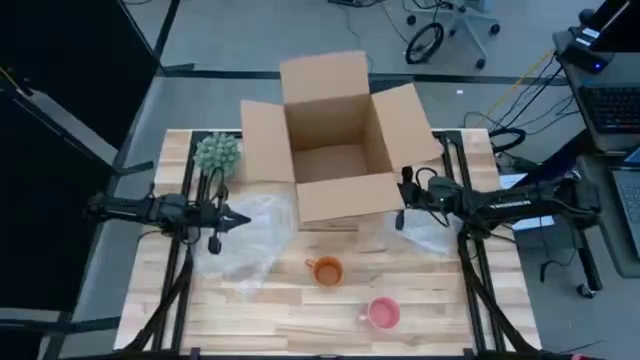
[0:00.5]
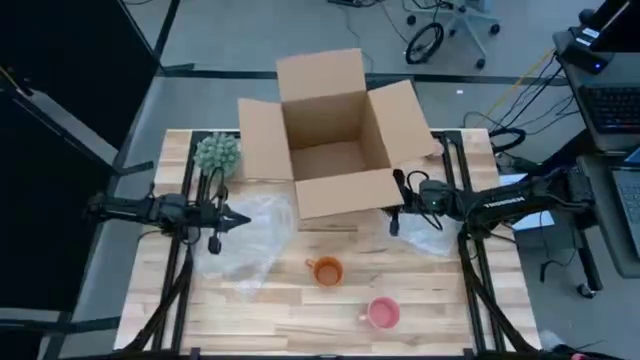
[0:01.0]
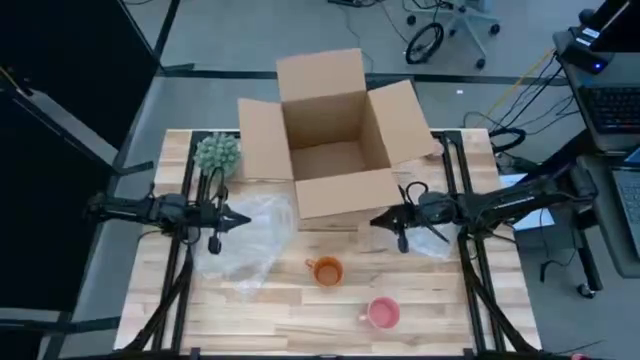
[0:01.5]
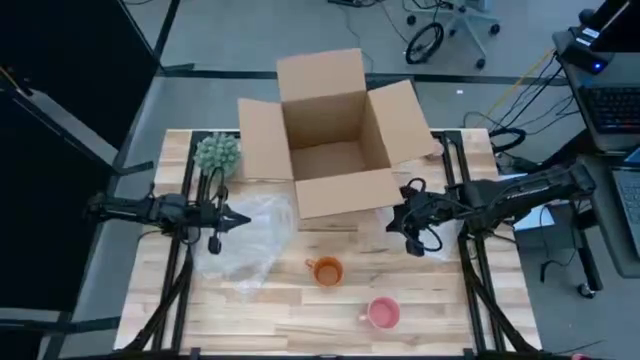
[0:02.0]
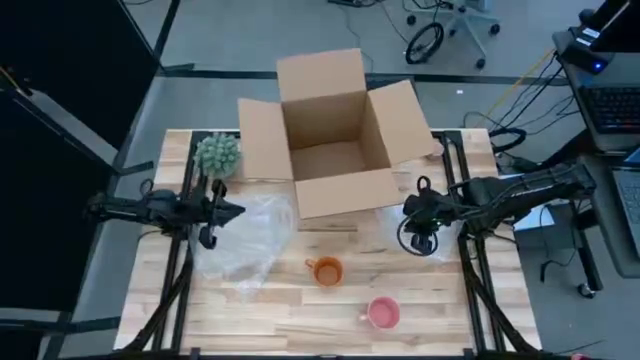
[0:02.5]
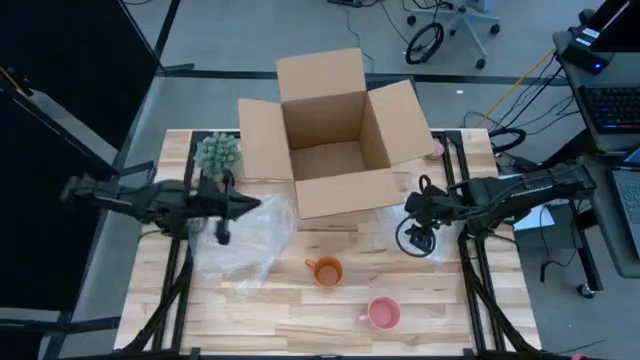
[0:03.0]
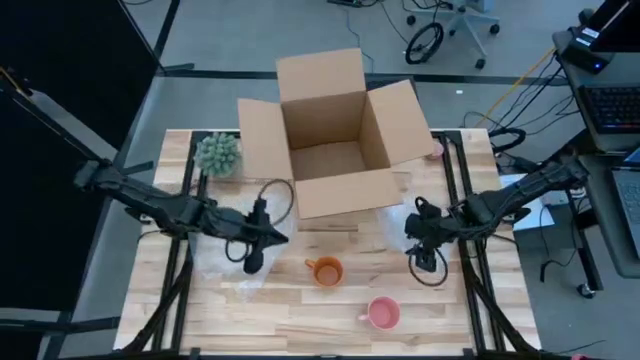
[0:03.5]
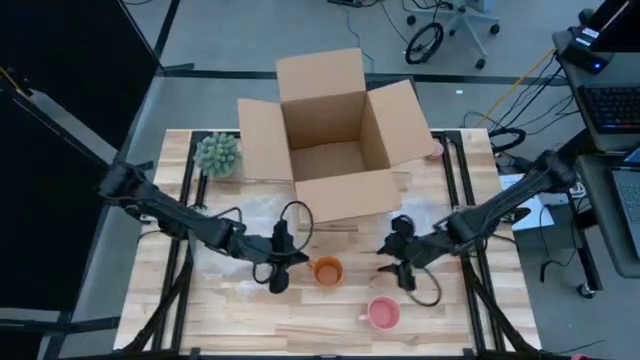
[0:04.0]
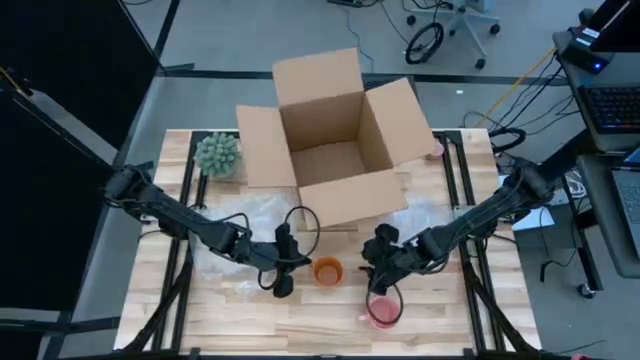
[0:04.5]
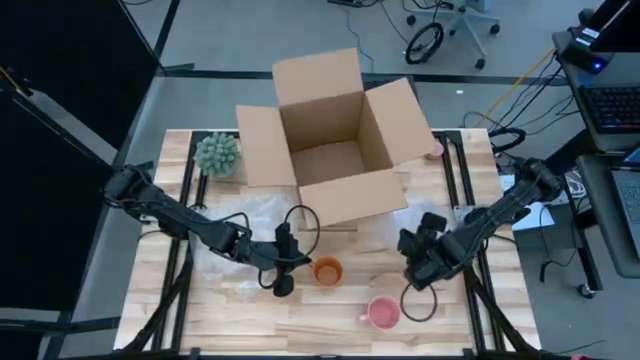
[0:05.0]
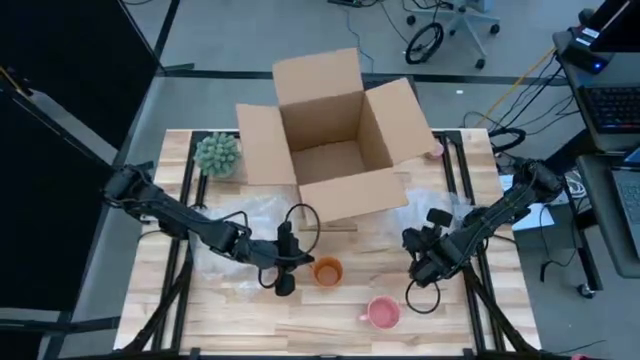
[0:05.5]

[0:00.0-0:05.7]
Task: wrap mug
Prepare the right bubble wrap

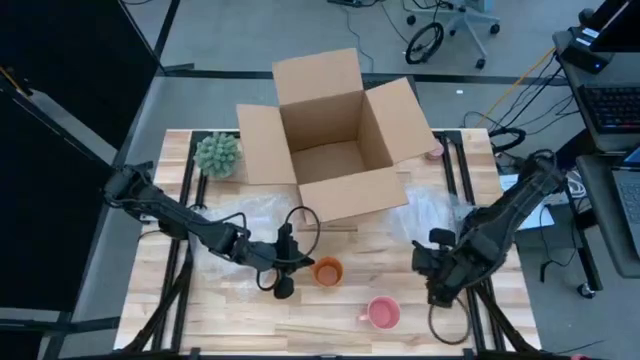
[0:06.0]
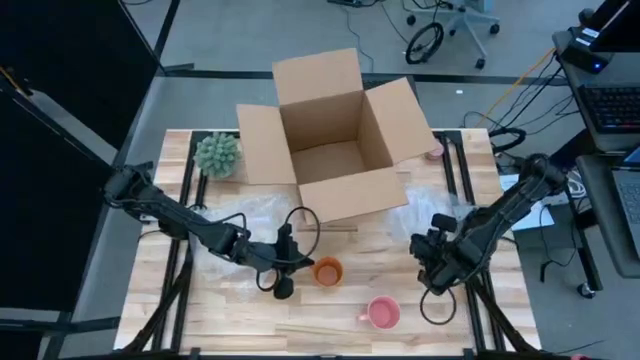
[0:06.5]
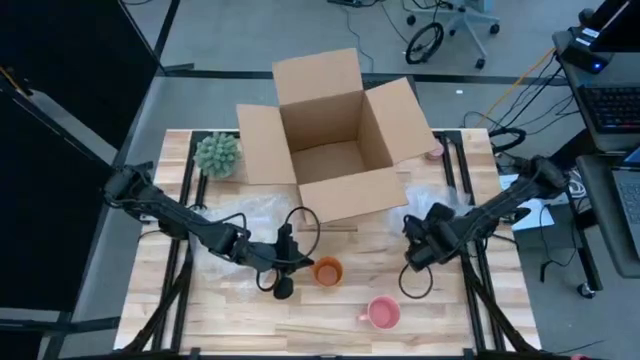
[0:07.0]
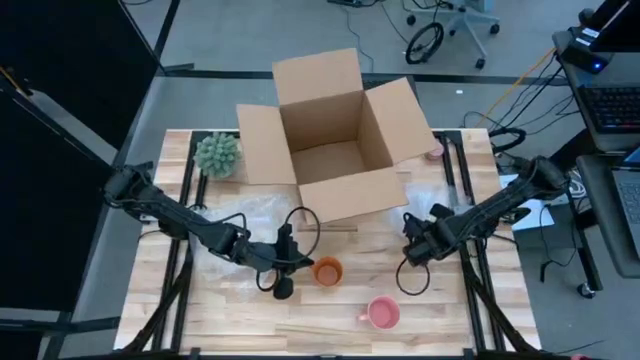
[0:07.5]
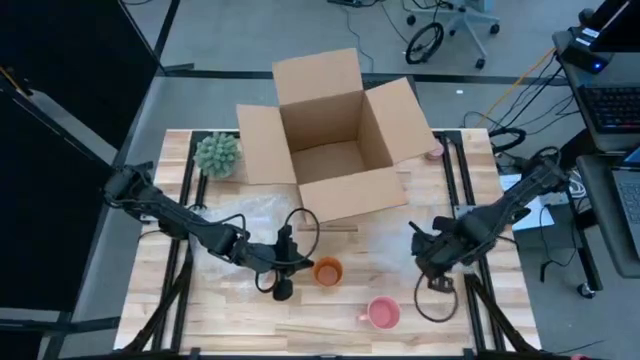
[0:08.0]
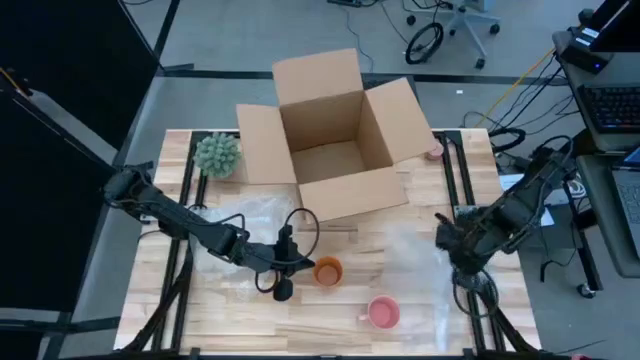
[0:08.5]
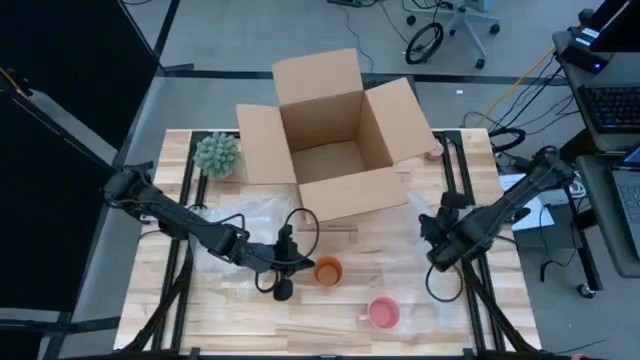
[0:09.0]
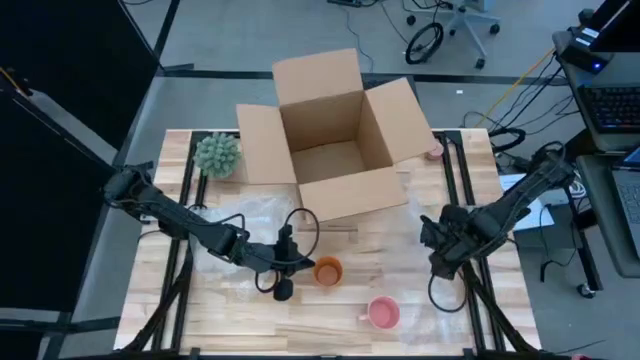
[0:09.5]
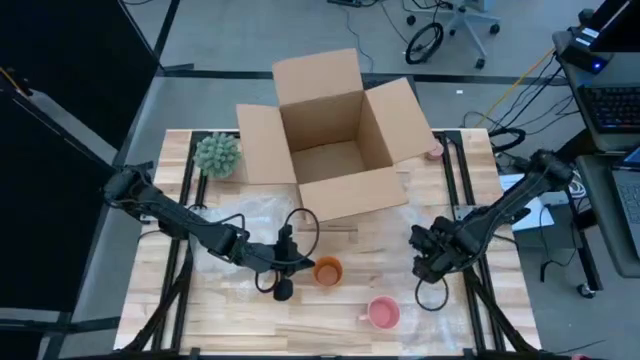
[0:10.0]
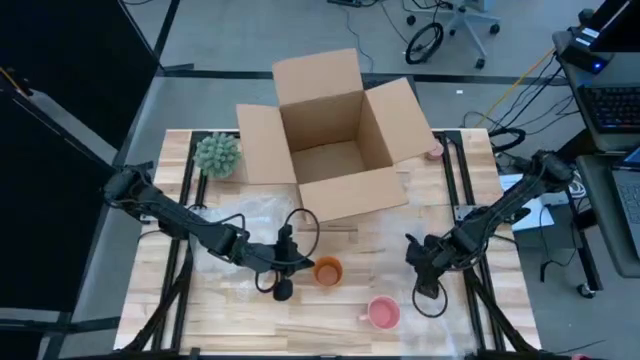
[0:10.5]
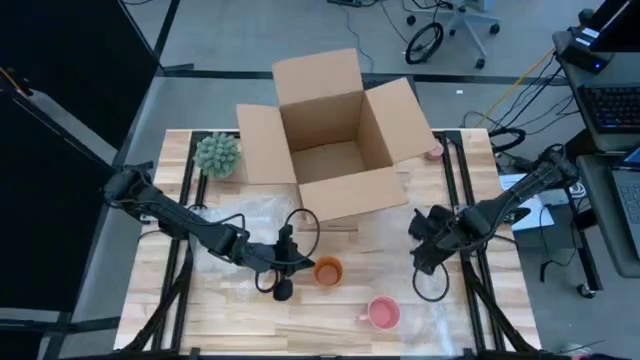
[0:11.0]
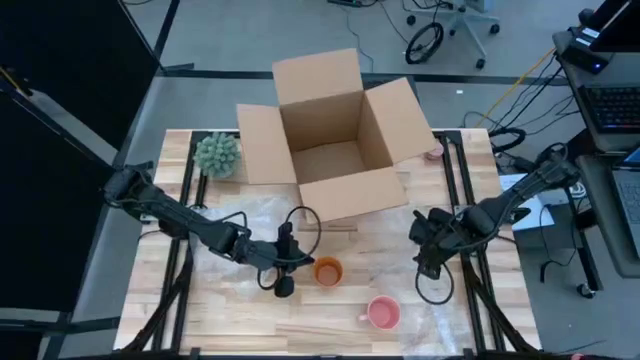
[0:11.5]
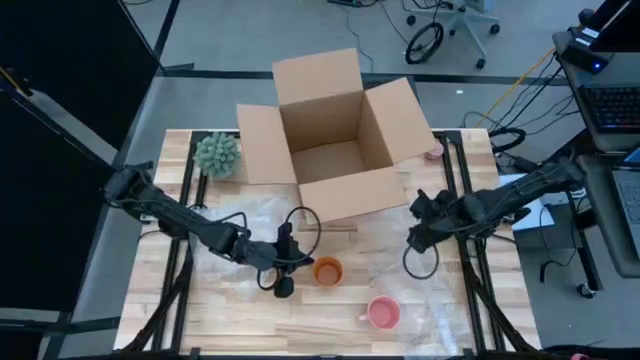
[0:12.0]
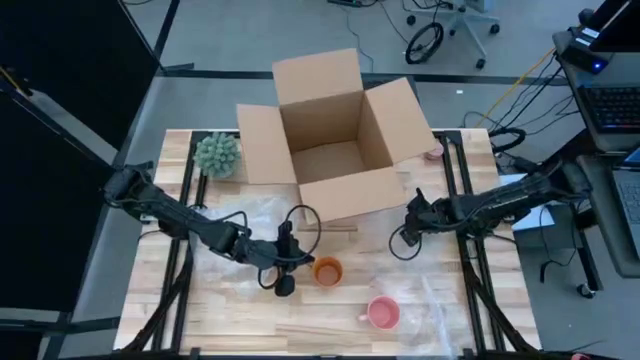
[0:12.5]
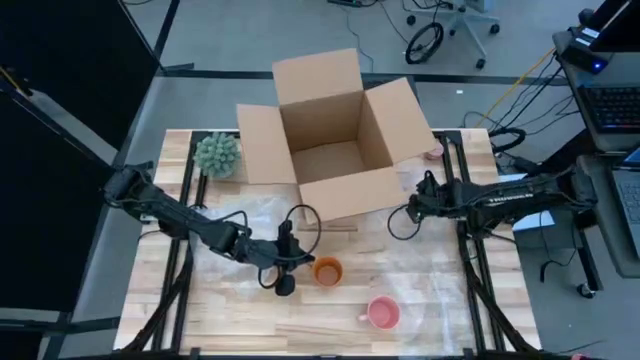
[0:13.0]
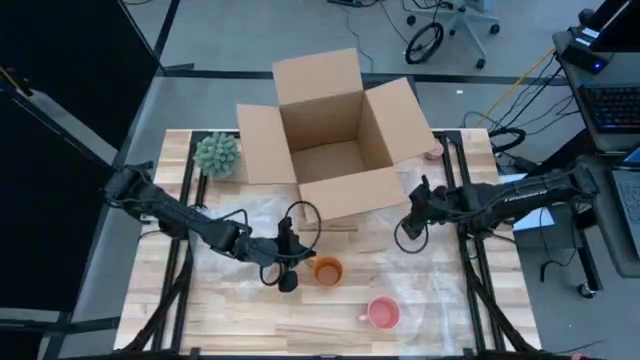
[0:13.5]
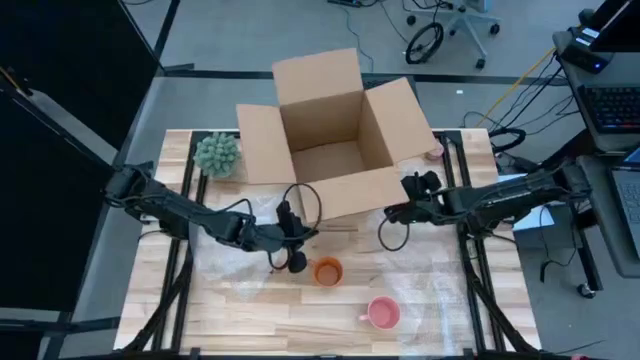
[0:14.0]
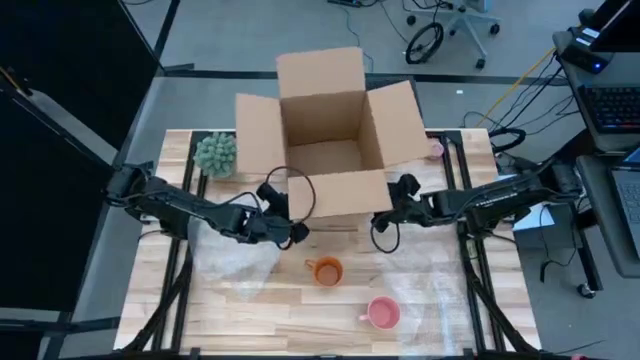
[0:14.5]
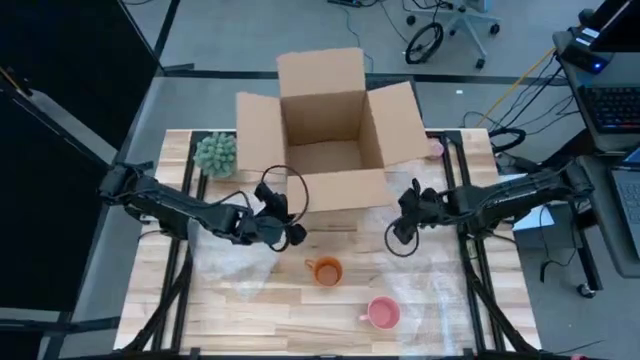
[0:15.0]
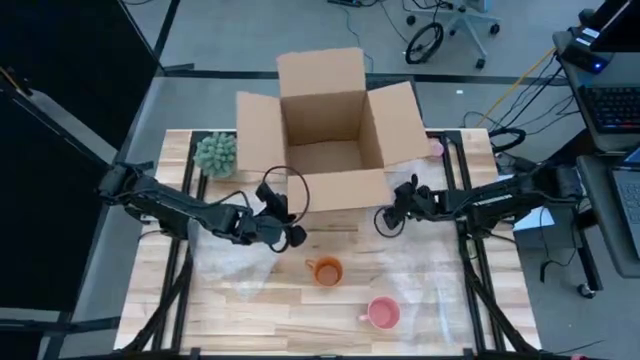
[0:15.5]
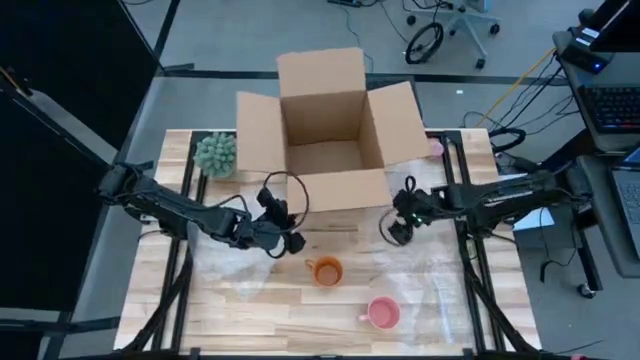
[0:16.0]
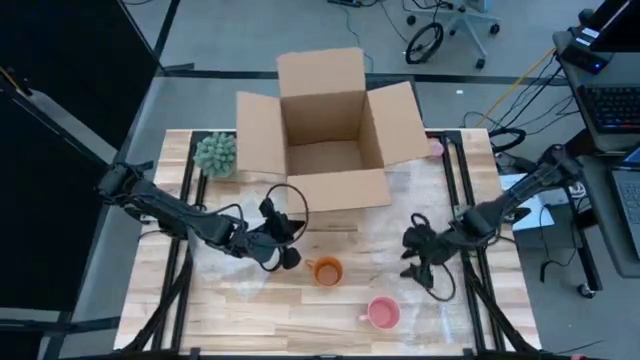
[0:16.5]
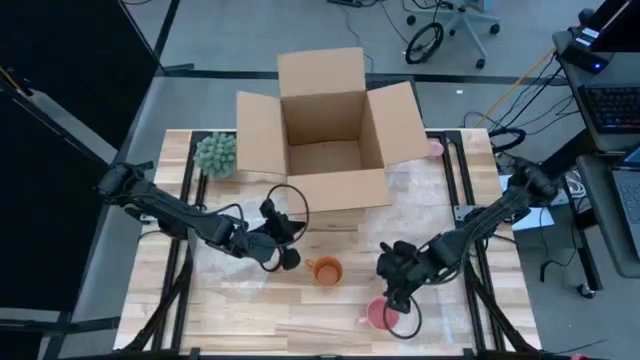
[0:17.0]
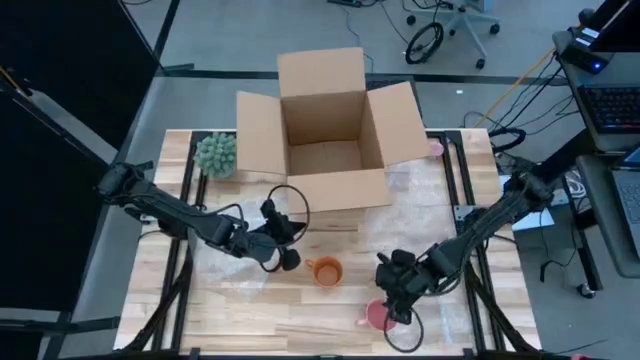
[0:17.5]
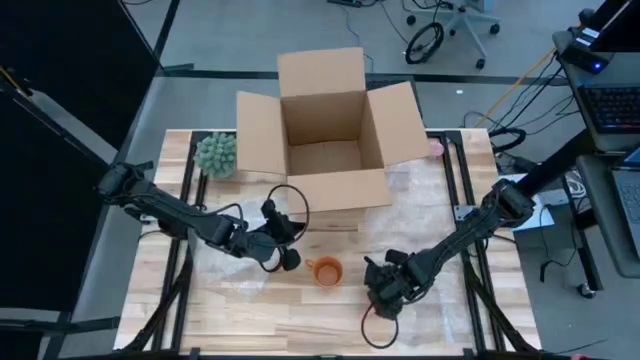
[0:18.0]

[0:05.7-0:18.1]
Prepare the right bubble wrap

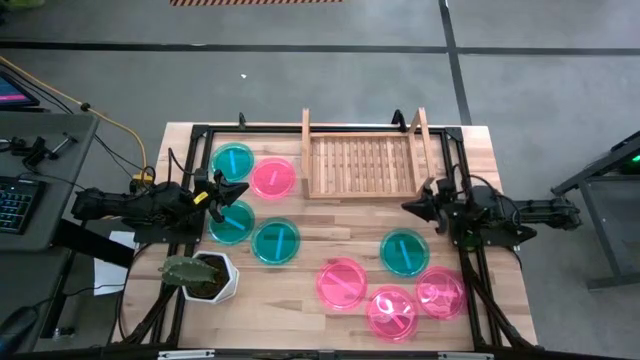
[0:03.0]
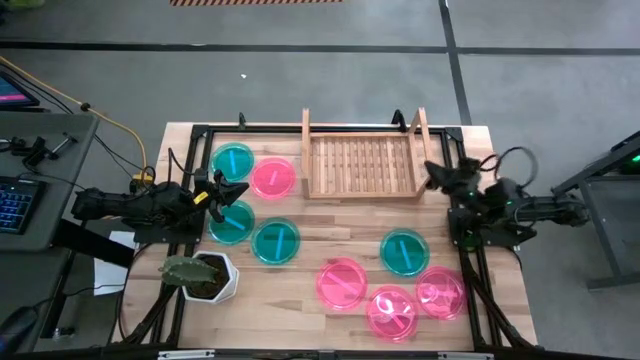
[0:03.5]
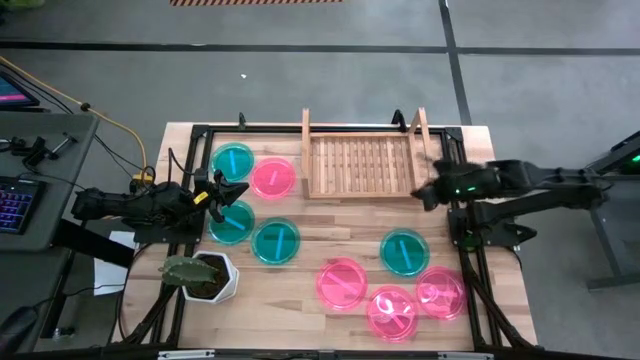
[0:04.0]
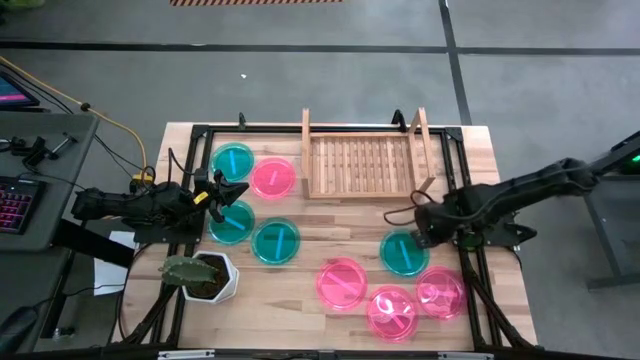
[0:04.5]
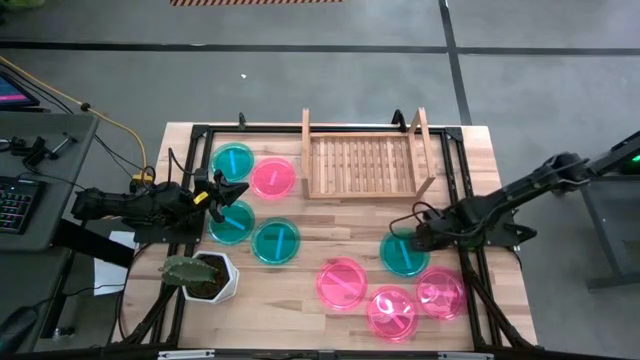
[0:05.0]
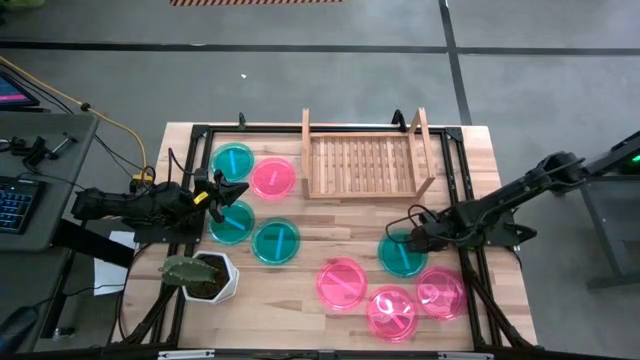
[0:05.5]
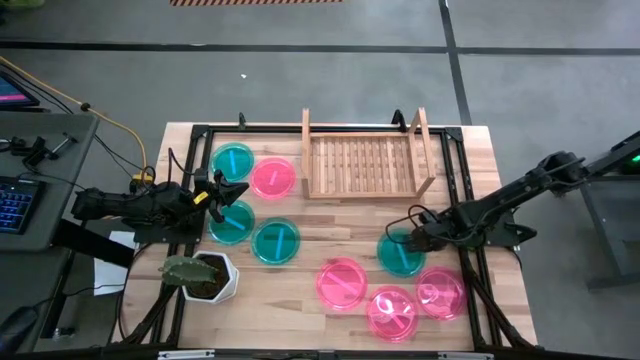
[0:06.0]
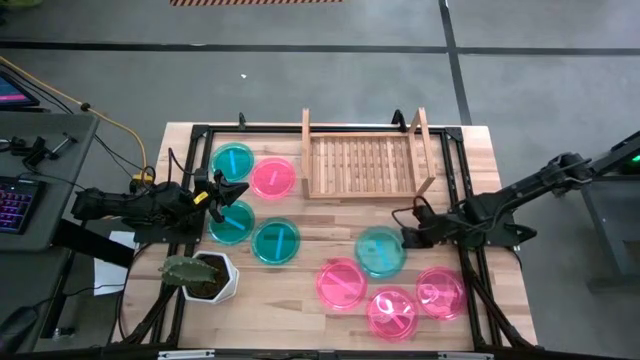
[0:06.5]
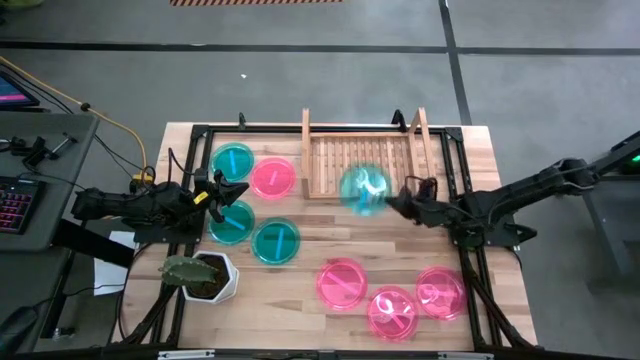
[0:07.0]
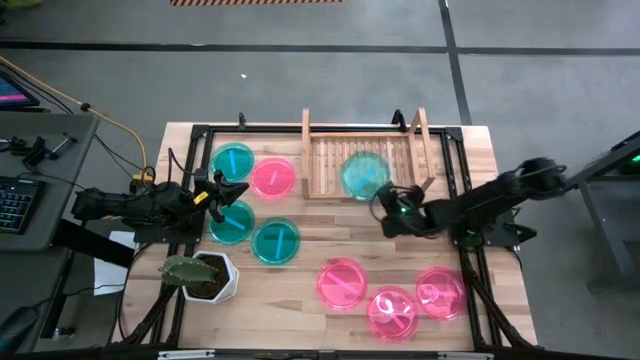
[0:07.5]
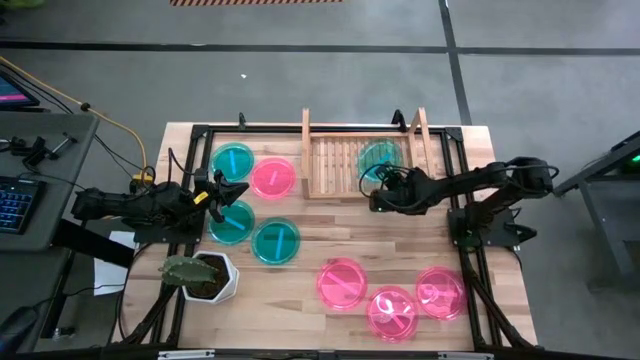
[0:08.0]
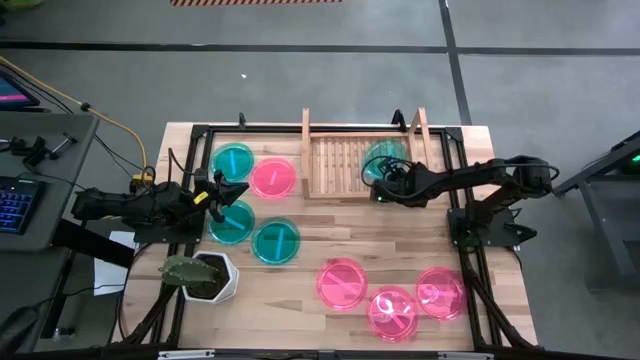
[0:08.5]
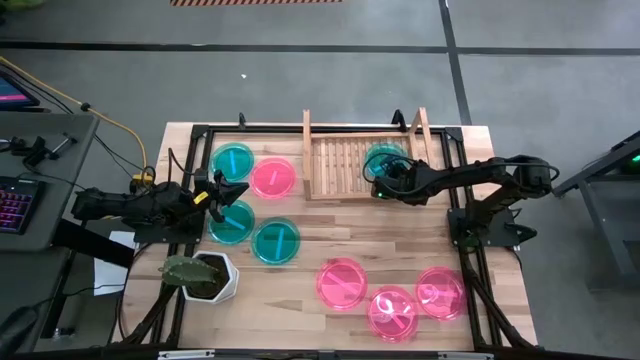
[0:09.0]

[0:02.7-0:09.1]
Task: Place and stack plates onto a shelf
Put the blue plate on the shelf
